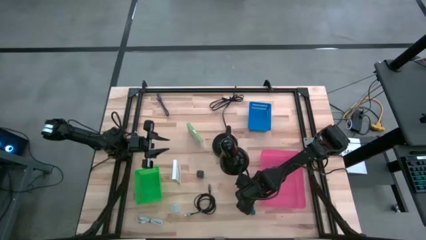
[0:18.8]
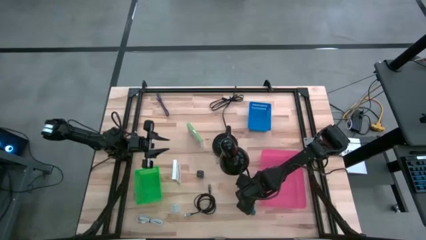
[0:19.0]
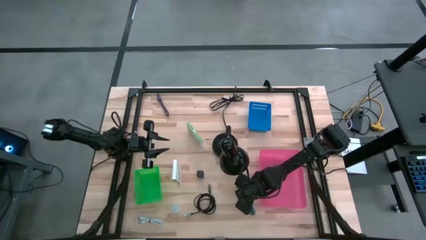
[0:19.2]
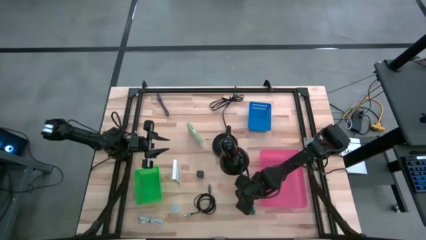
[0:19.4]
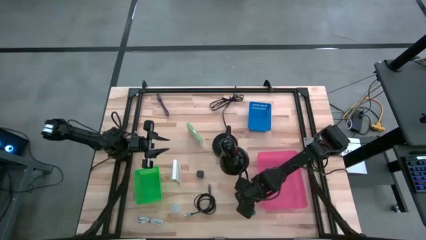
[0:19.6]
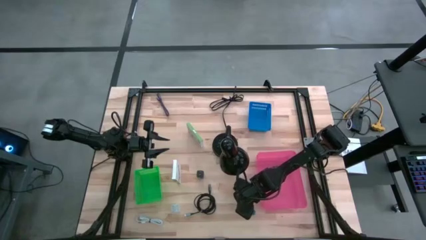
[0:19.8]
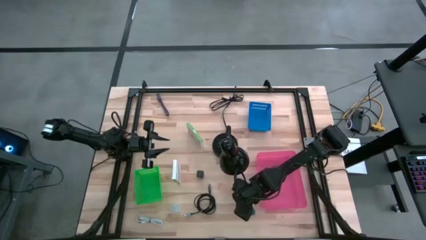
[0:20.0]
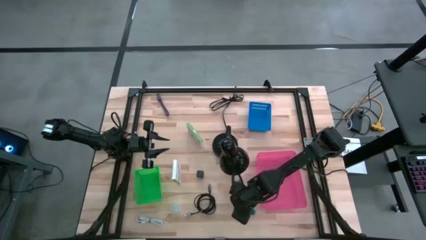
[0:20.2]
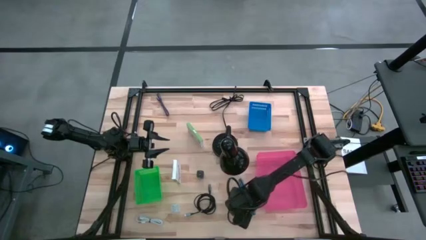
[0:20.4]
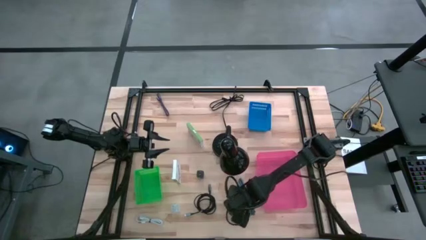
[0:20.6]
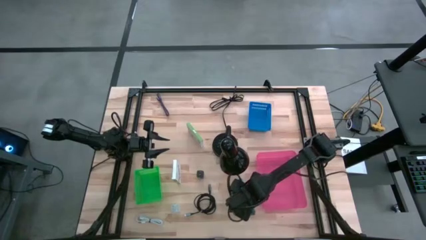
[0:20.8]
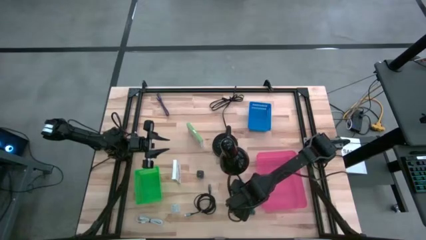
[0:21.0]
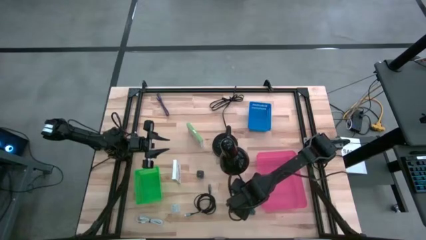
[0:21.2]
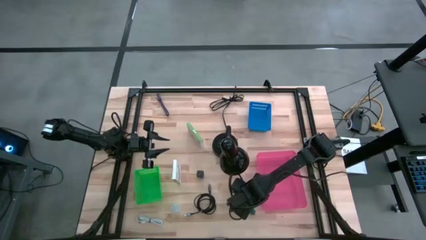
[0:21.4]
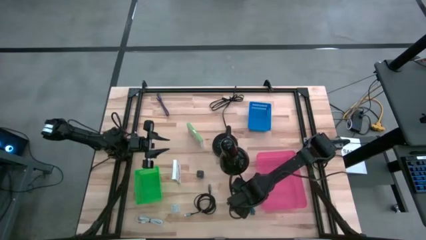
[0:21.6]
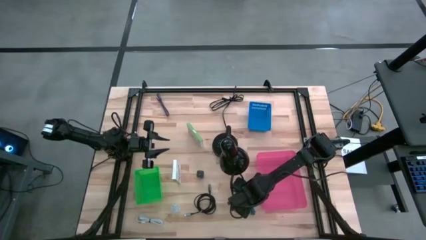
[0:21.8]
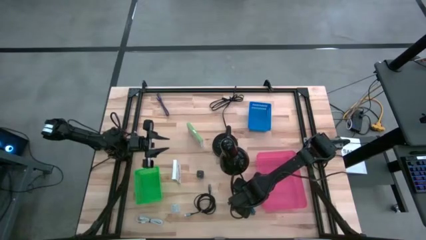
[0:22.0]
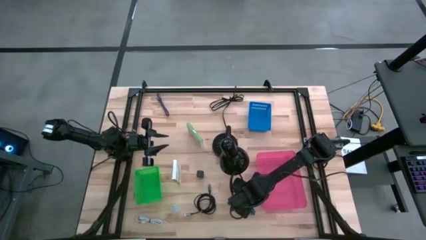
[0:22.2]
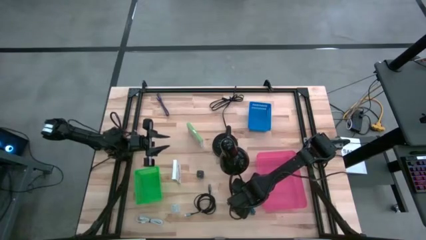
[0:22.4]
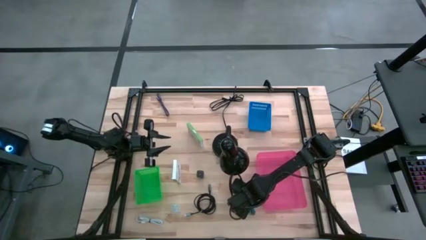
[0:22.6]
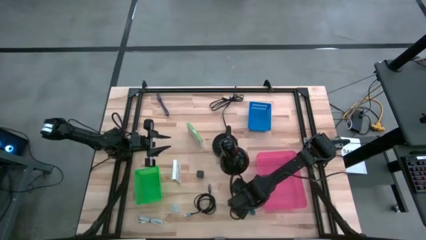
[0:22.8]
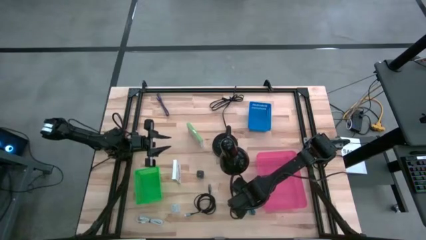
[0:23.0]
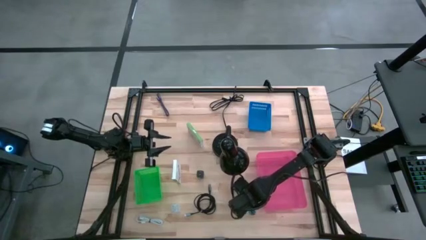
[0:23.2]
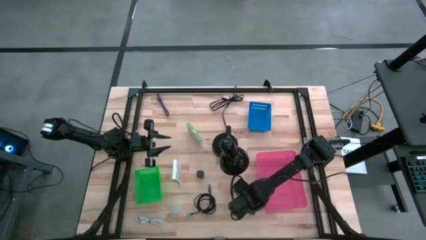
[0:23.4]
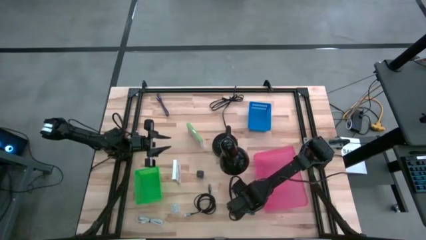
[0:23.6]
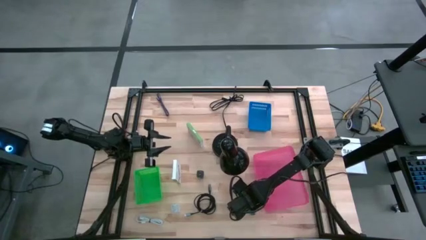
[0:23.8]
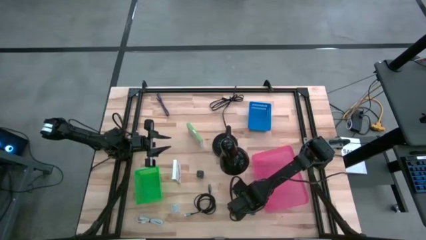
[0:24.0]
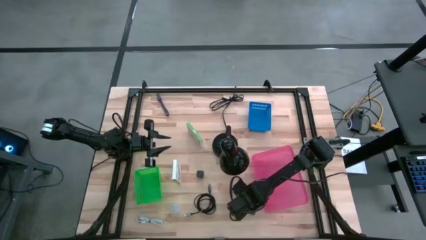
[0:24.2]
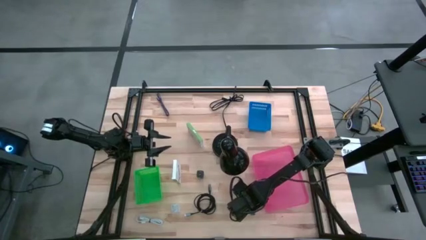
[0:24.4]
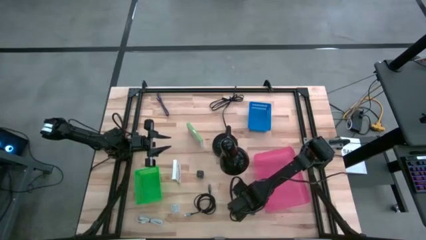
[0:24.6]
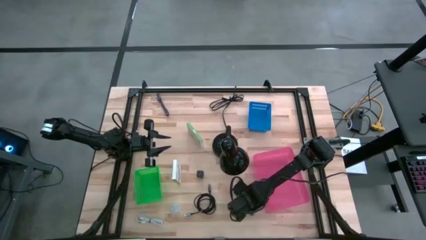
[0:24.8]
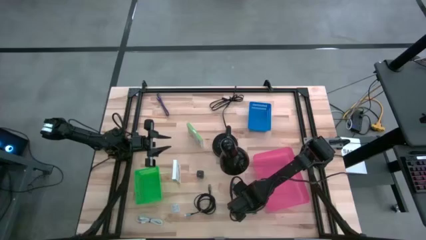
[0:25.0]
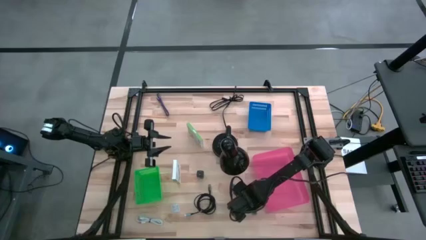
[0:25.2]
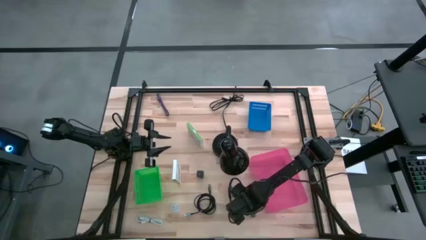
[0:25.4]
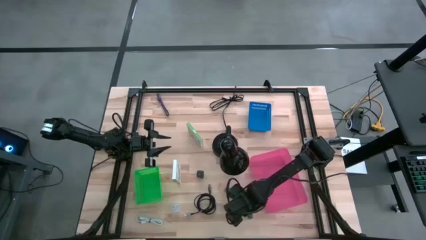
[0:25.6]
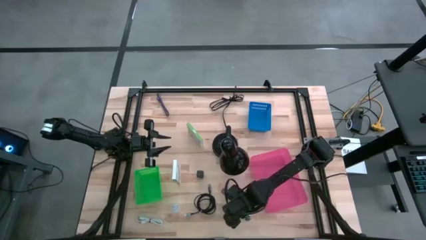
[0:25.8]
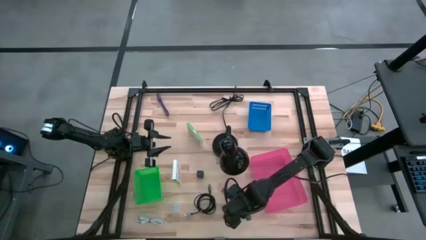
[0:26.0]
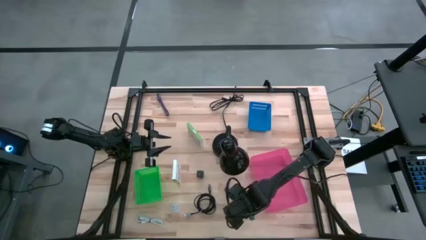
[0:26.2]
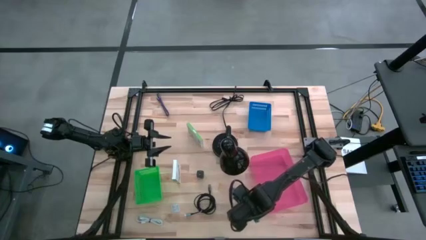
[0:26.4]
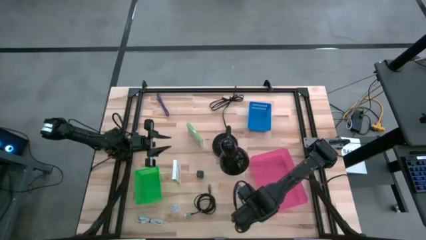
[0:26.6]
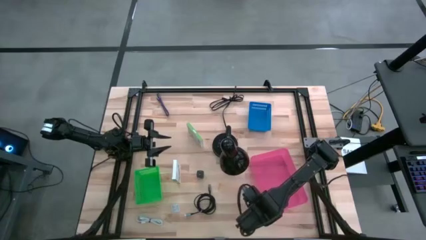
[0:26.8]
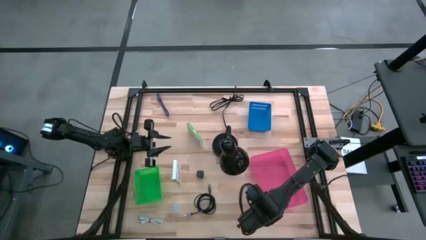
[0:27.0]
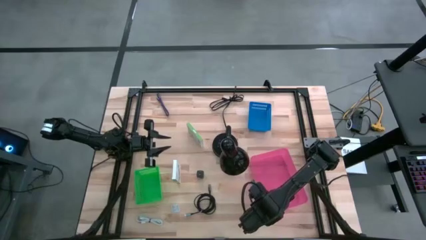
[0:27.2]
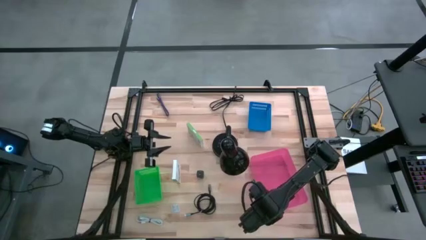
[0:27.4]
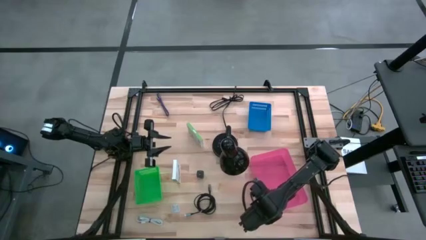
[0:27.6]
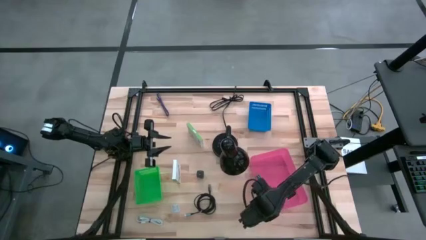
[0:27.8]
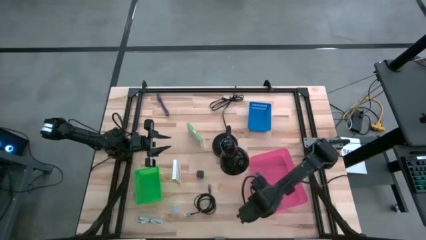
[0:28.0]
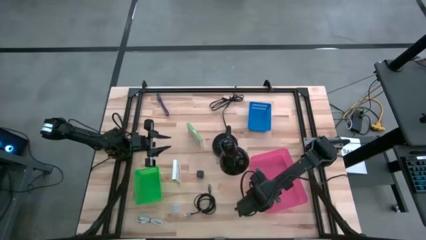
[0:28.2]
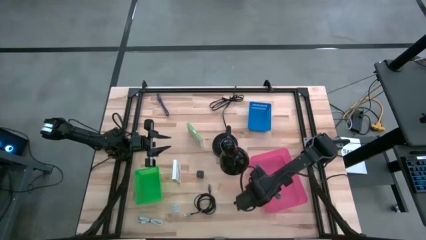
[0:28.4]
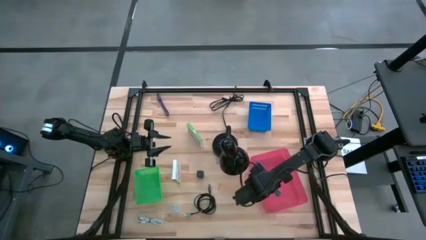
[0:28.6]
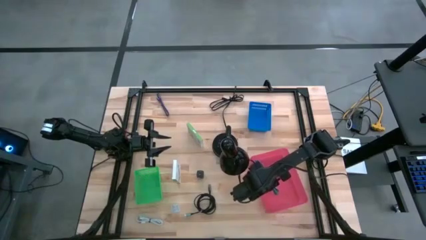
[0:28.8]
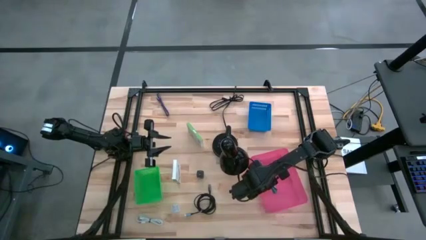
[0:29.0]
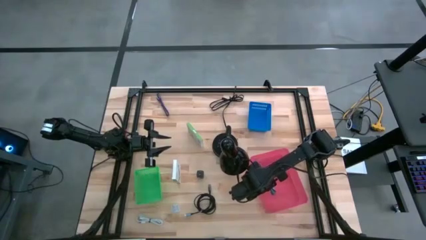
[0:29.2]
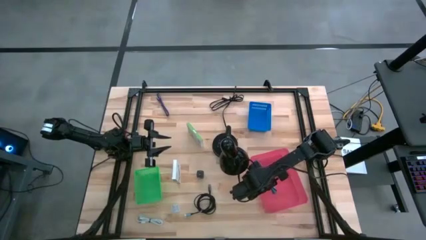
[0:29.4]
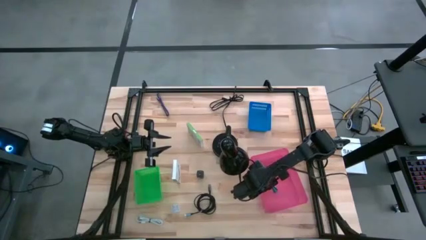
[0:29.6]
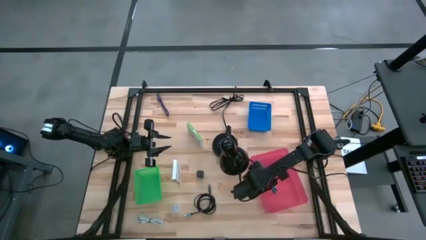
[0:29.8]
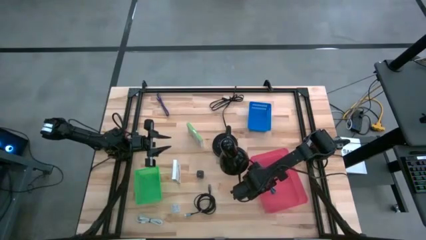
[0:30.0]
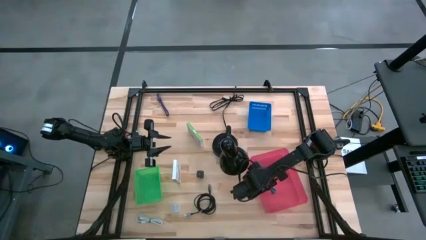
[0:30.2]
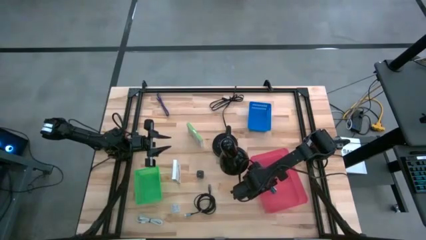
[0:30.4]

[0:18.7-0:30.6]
Task: Pick and place items into bin
Put the blue charger cable into the red bin

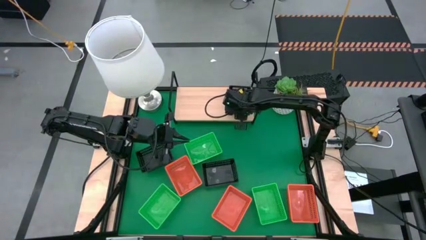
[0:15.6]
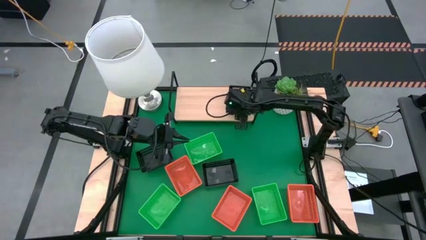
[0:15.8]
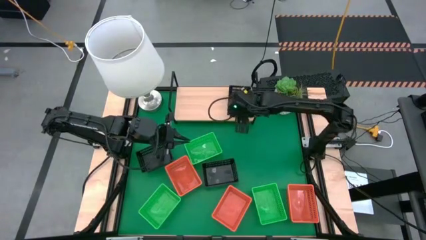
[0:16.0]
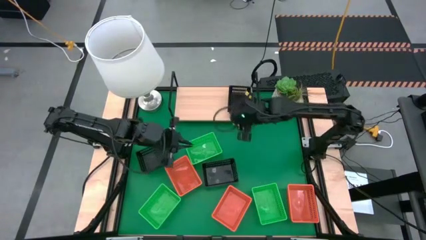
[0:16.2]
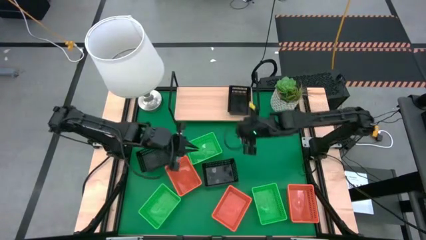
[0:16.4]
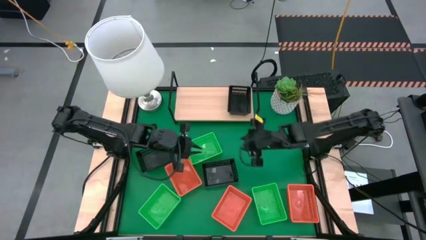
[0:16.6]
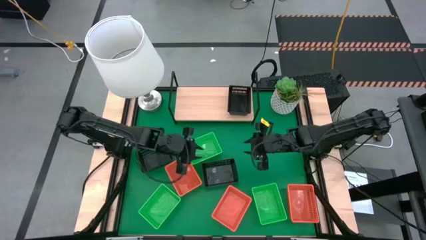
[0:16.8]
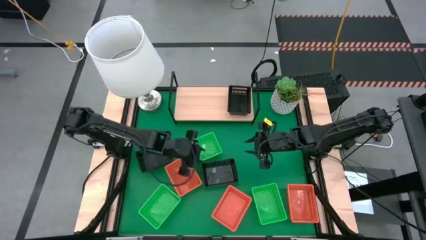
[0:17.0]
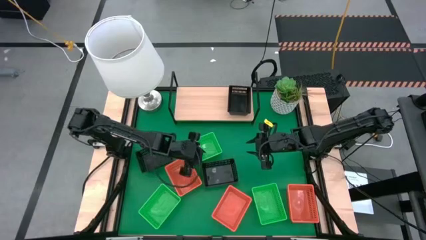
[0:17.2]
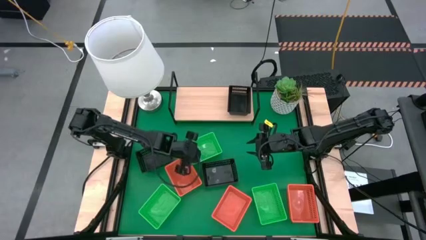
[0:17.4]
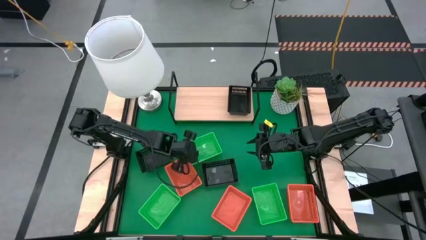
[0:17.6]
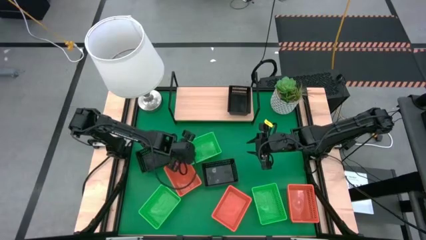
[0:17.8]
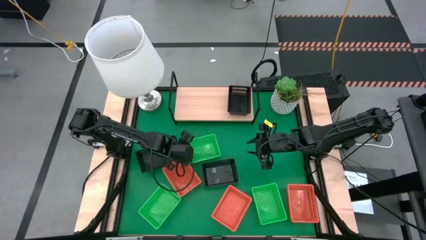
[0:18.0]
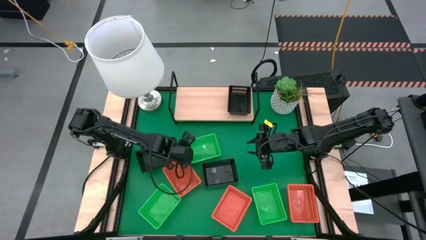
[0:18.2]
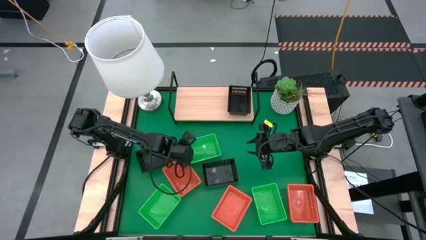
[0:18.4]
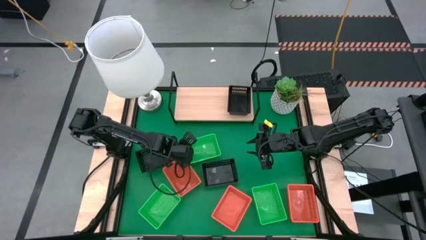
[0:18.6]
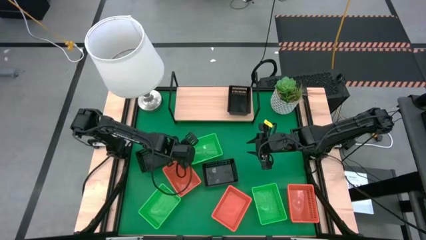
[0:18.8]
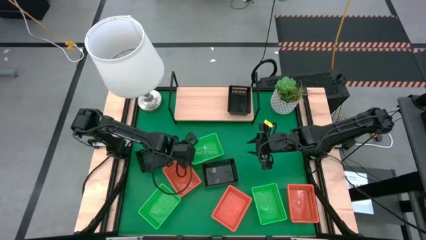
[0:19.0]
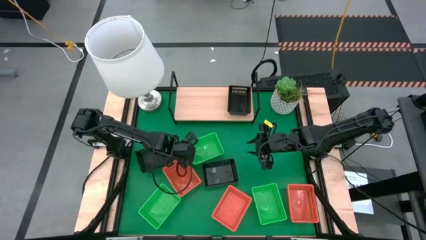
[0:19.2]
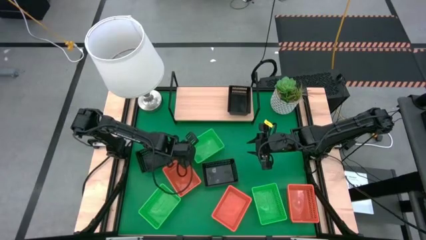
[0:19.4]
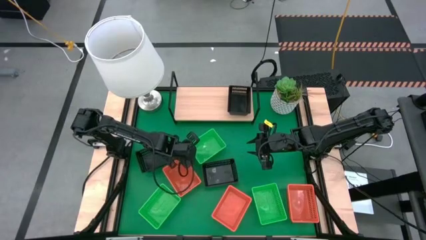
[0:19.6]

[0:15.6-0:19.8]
Task: Stack baskets on shelf by color
Put the top green bin on the shelf
